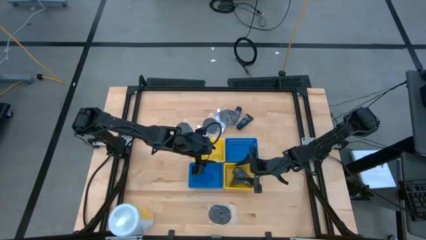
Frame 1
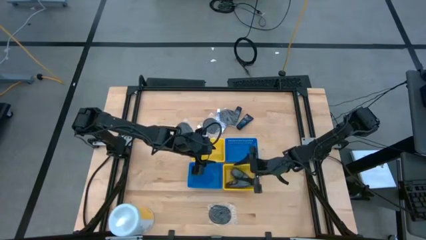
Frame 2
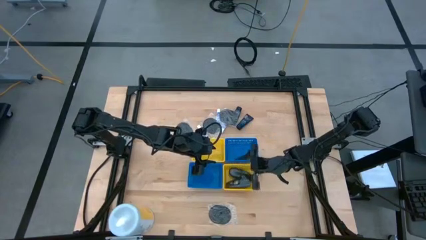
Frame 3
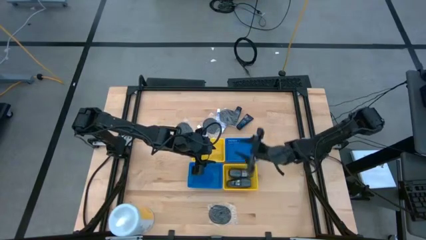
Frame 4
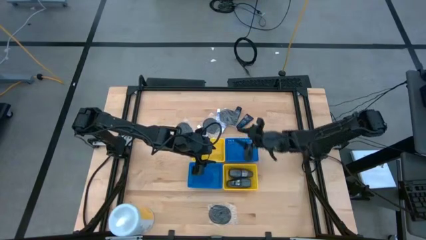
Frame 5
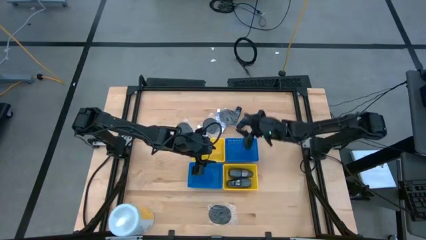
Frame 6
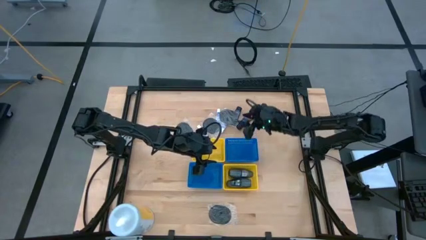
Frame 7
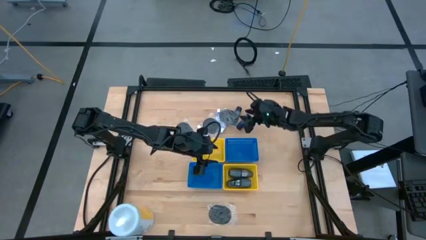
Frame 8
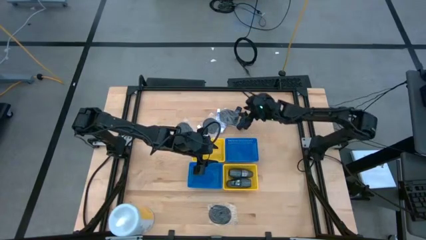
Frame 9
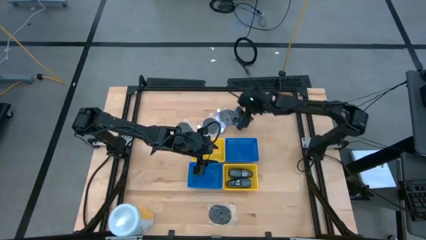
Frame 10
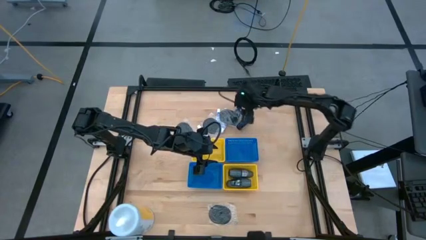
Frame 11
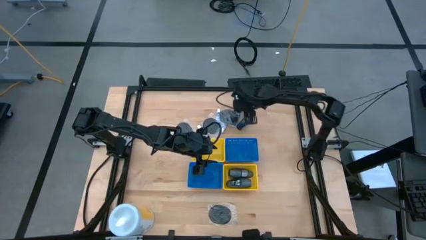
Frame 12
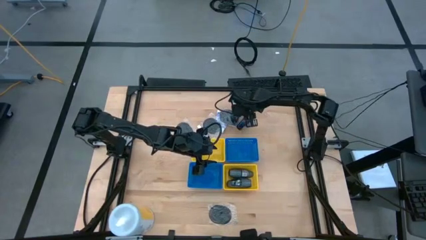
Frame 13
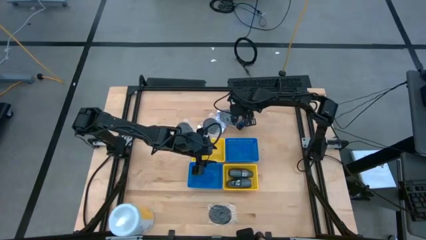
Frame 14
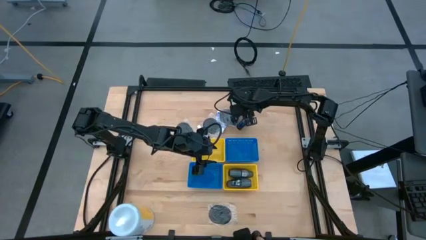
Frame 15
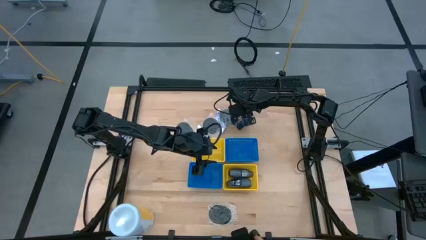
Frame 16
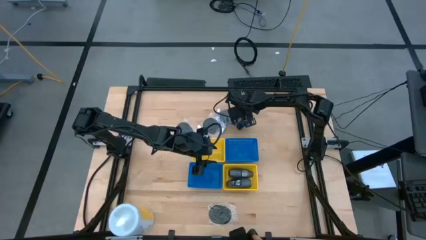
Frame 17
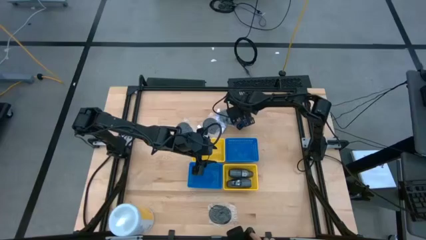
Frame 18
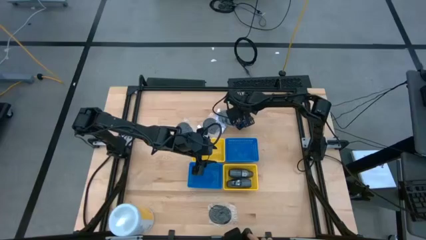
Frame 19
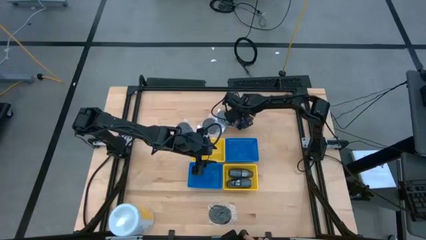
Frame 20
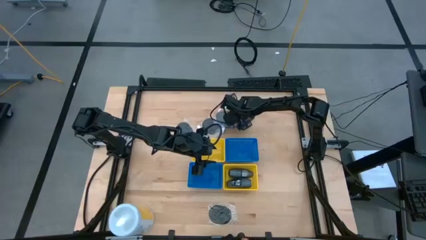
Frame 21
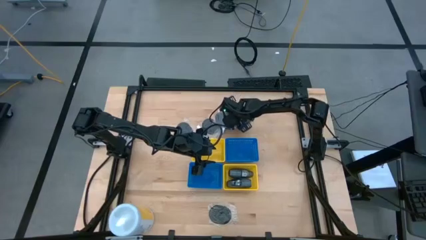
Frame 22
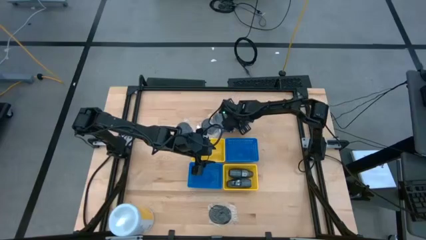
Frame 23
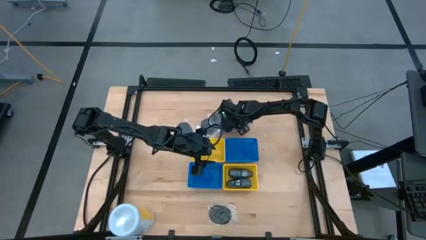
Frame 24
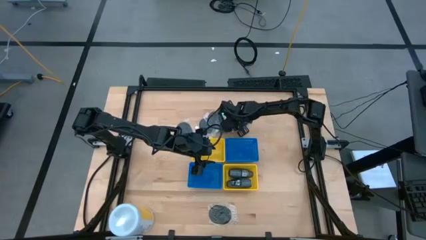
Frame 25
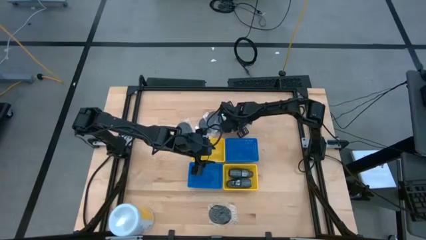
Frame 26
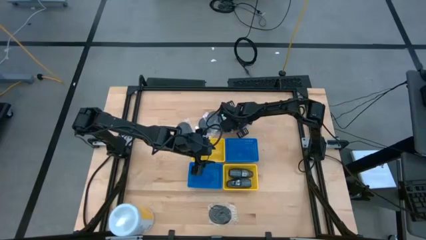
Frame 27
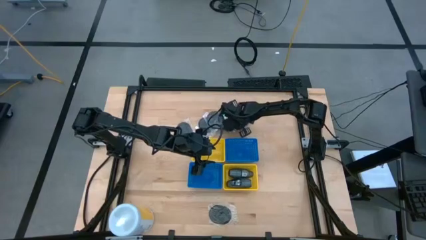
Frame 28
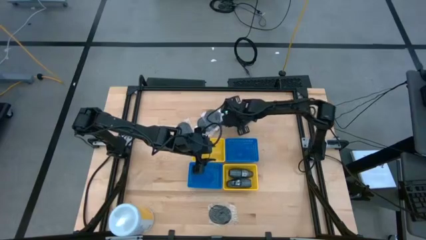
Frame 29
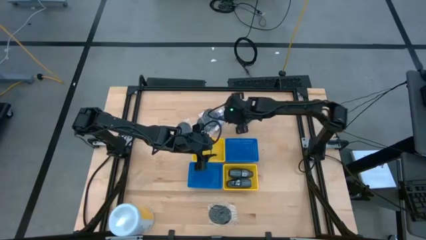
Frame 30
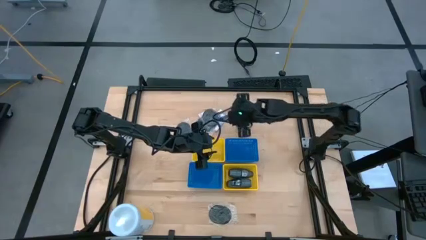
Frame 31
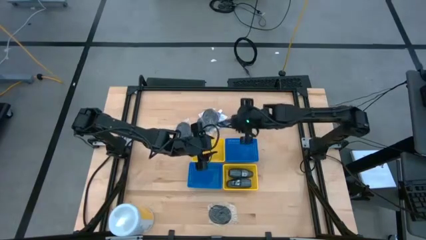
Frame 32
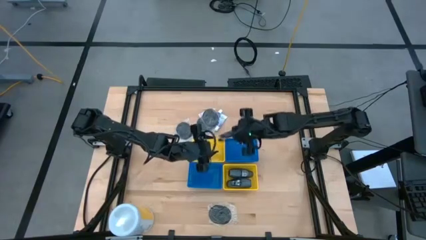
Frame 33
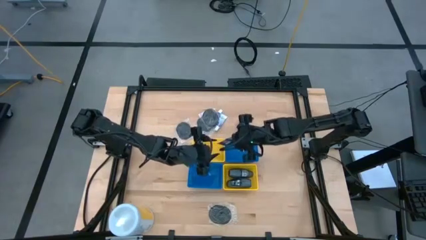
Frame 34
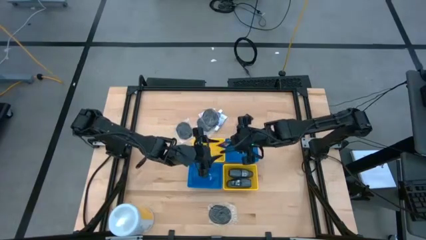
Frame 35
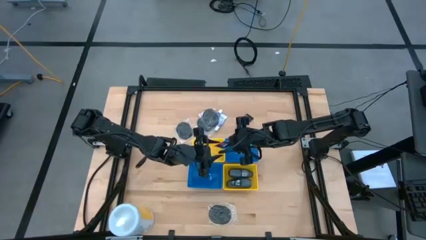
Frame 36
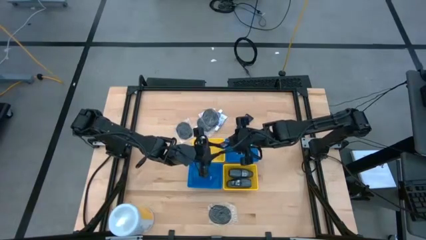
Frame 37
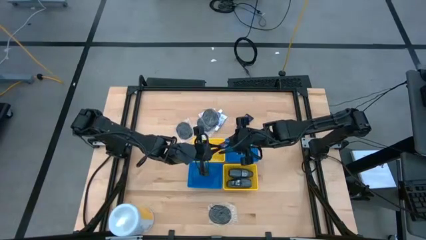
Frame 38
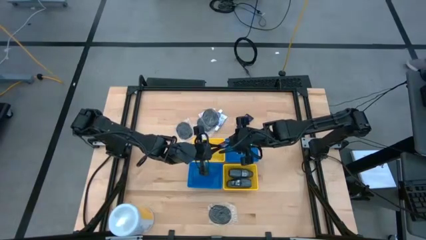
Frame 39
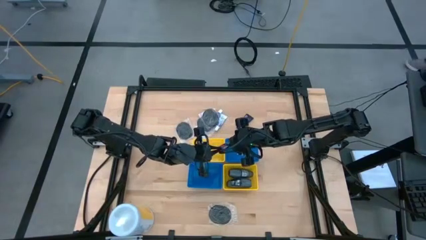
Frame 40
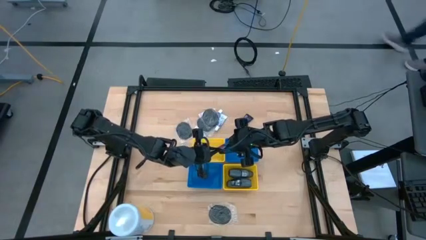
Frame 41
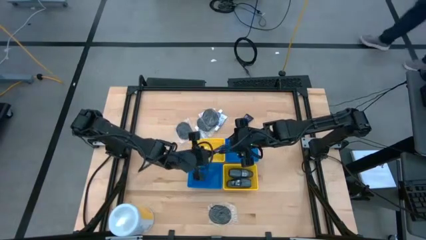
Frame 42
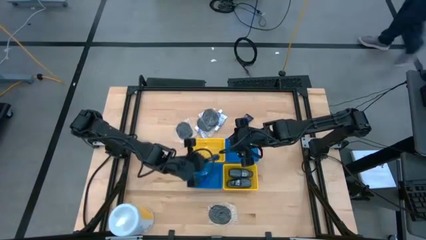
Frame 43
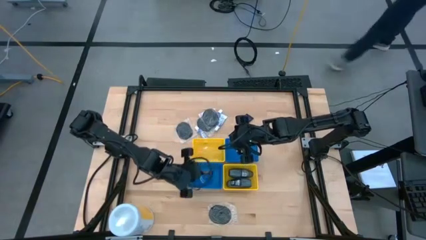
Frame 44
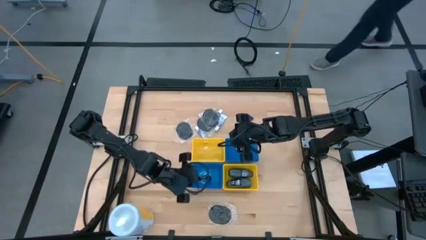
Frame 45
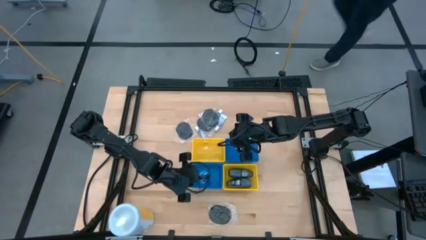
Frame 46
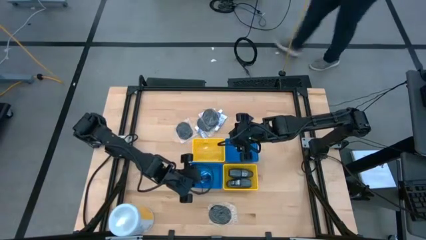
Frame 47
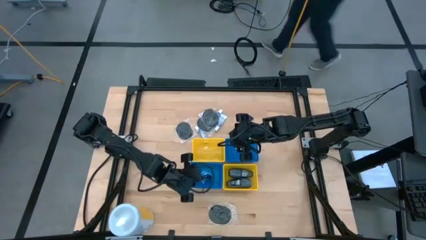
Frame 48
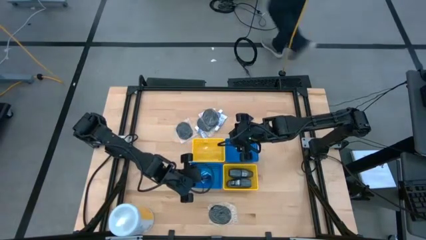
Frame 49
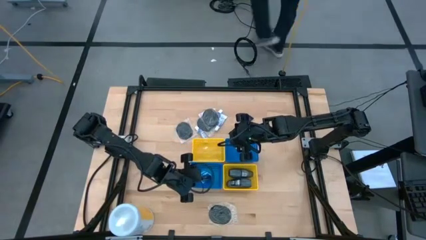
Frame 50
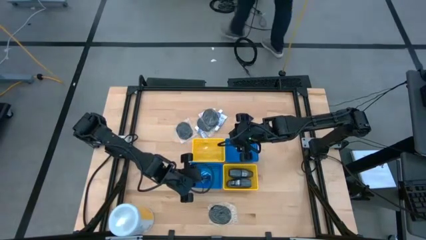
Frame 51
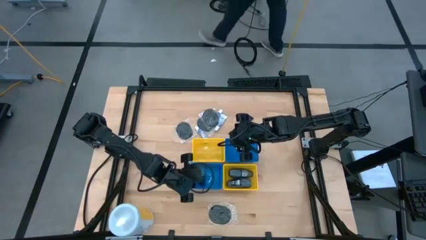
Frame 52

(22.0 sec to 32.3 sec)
Task: Pick & Place Travel size toiletries
Put the left shaving cream in the bottom blue bin

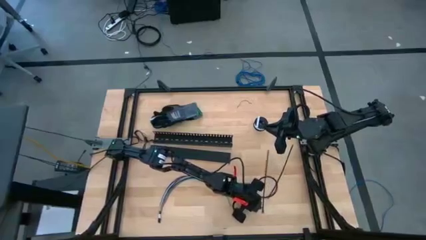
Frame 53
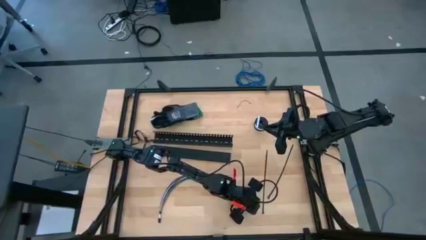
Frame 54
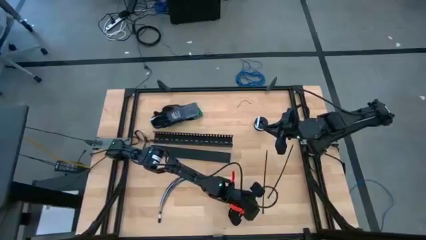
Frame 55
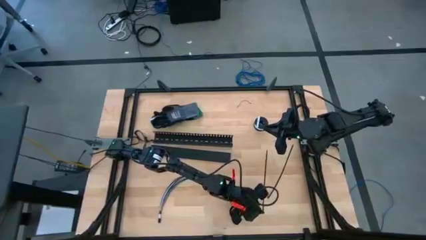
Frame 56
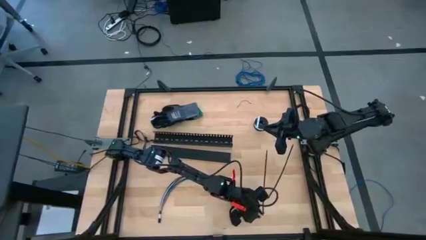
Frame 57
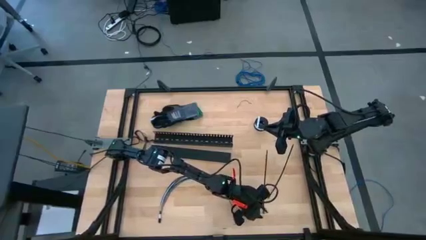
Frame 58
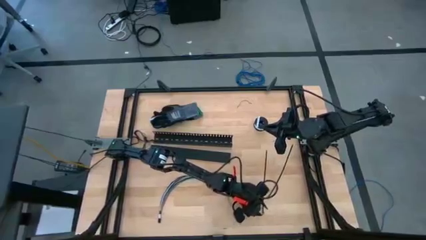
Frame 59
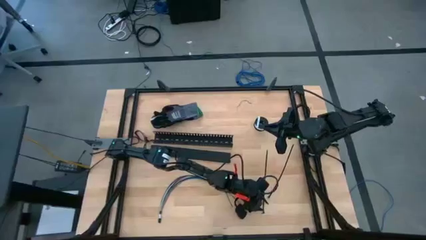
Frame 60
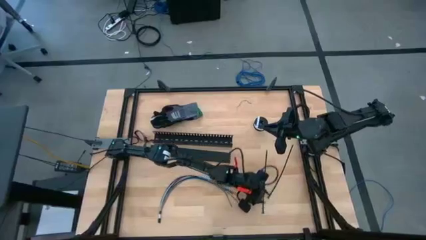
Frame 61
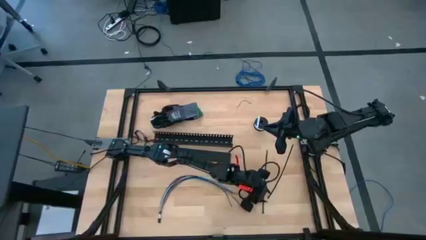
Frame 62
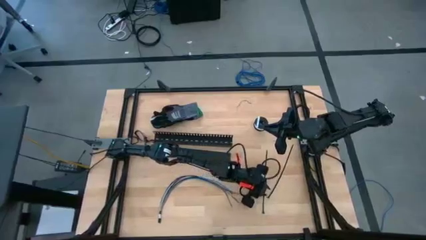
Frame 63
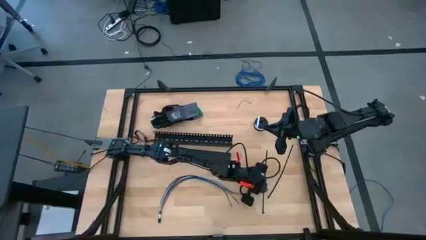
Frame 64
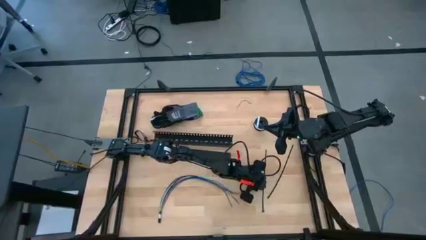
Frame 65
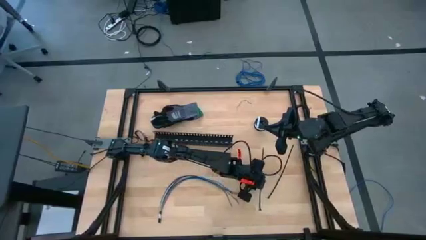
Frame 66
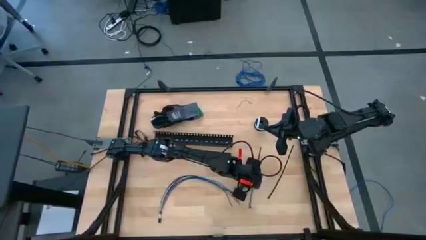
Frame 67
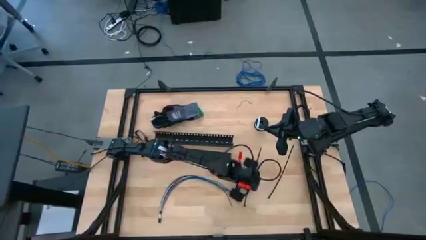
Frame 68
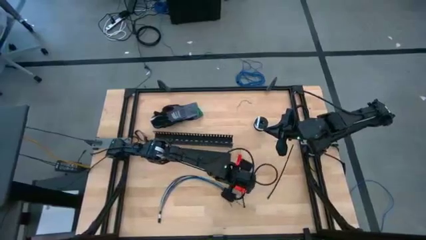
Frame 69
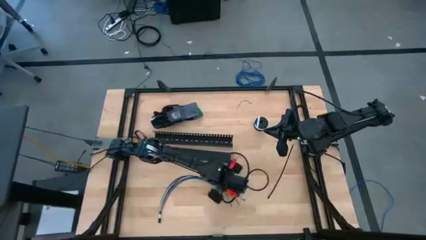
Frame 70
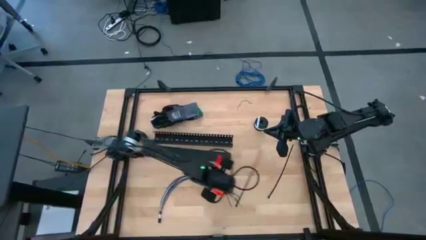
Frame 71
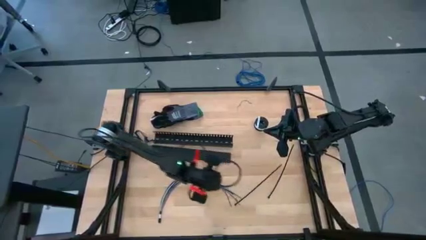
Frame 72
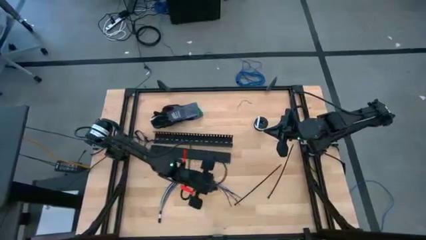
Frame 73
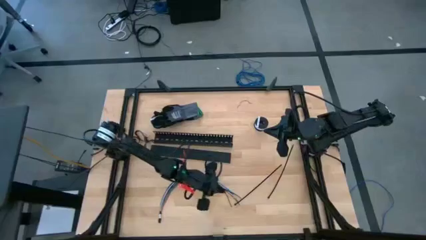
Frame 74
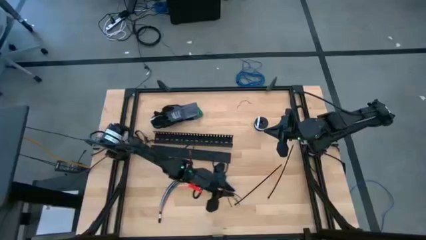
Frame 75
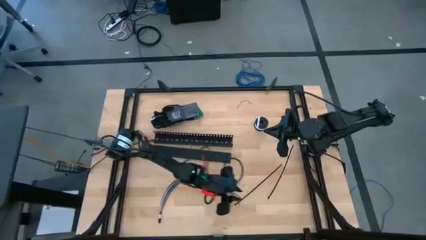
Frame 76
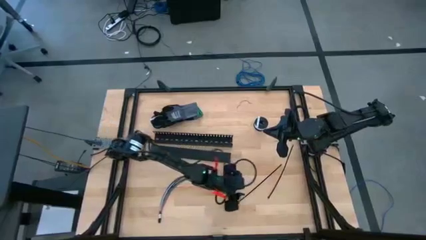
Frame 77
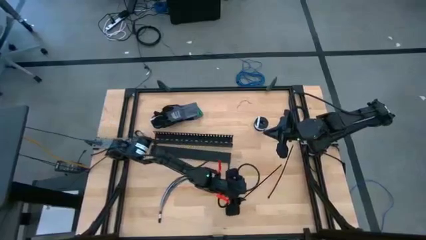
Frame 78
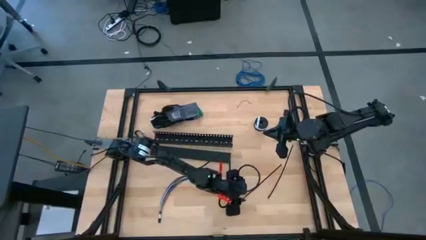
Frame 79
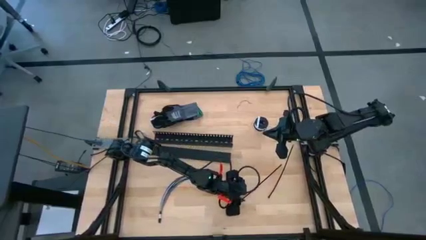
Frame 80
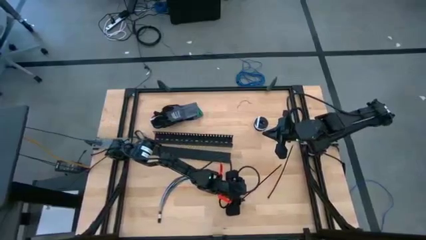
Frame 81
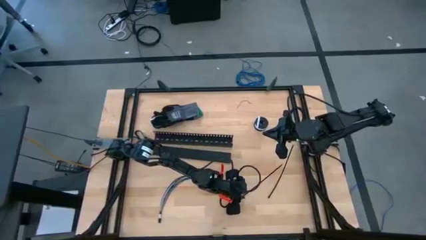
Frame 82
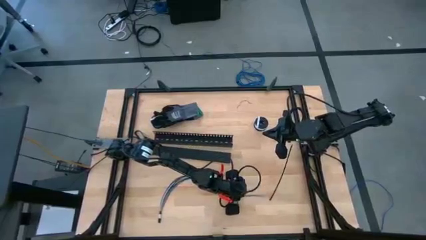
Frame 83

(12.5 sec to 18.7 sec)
Task: Ziptie cables
Prepare the left black zip tie
